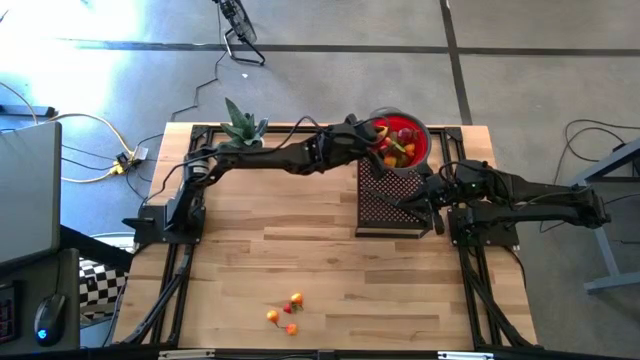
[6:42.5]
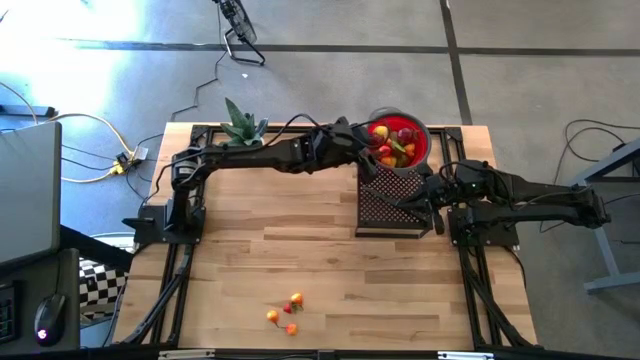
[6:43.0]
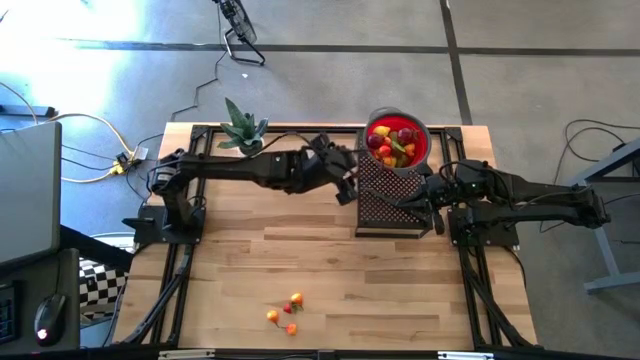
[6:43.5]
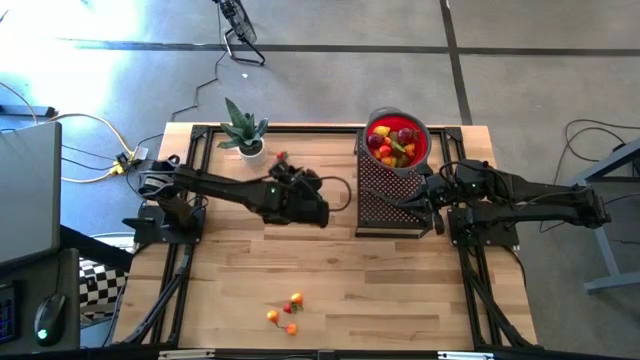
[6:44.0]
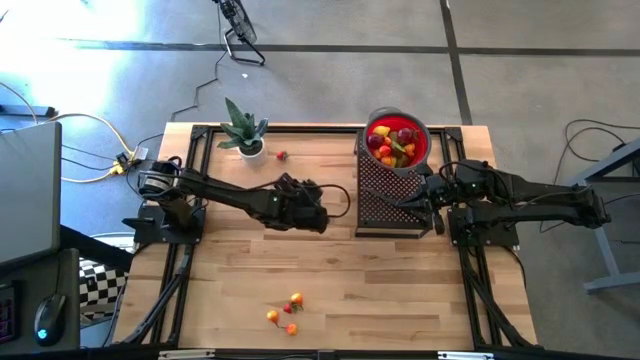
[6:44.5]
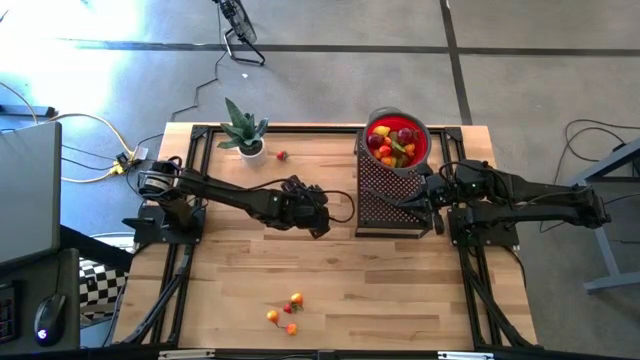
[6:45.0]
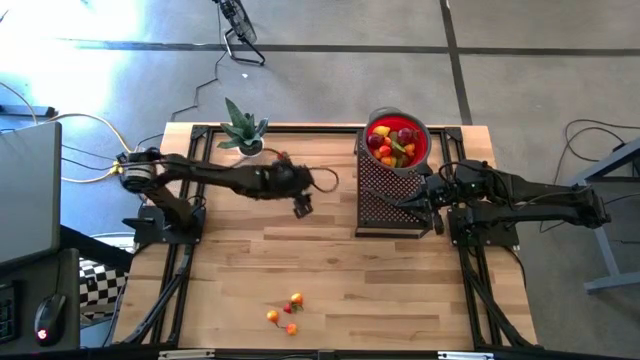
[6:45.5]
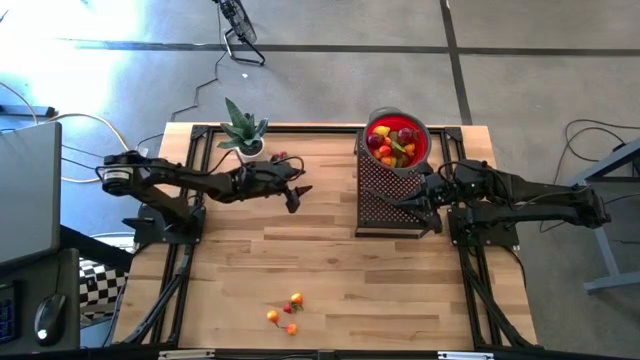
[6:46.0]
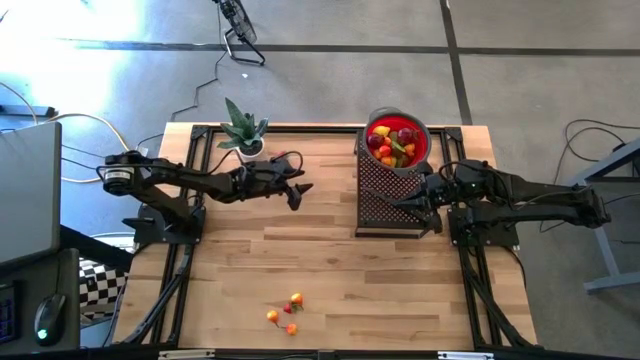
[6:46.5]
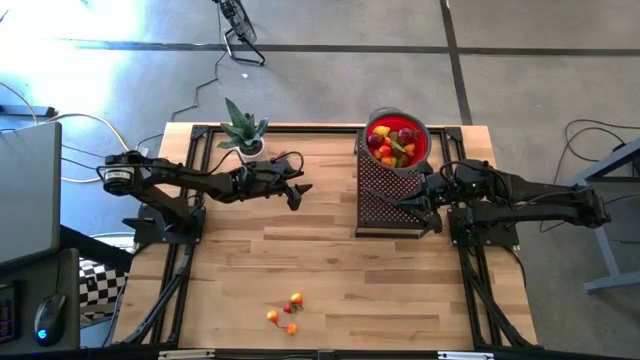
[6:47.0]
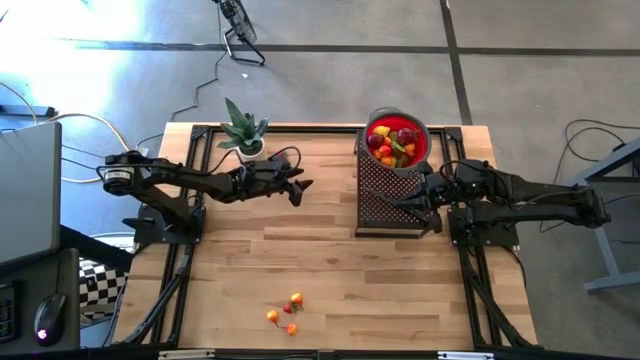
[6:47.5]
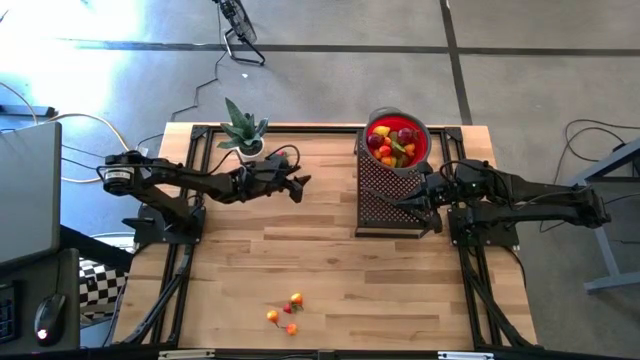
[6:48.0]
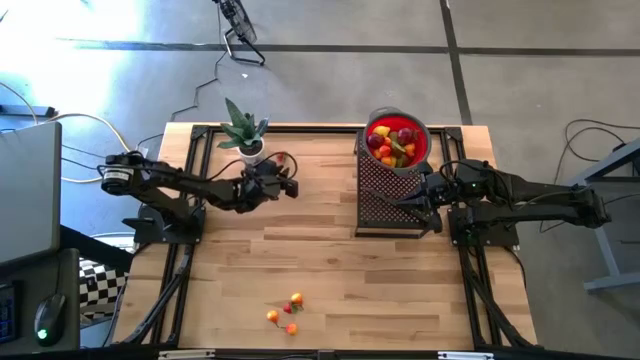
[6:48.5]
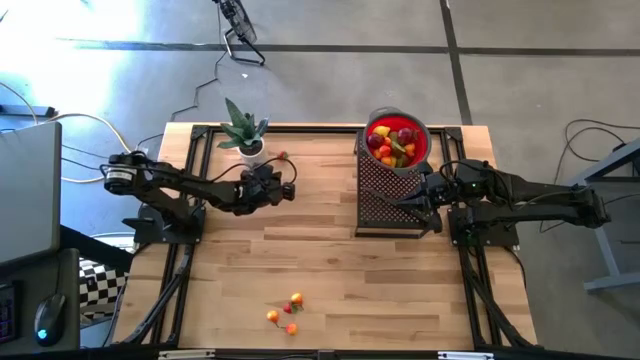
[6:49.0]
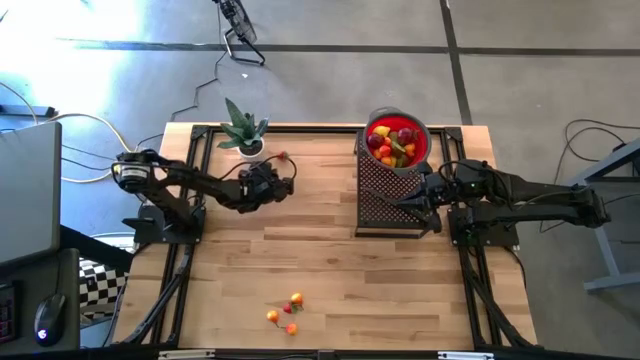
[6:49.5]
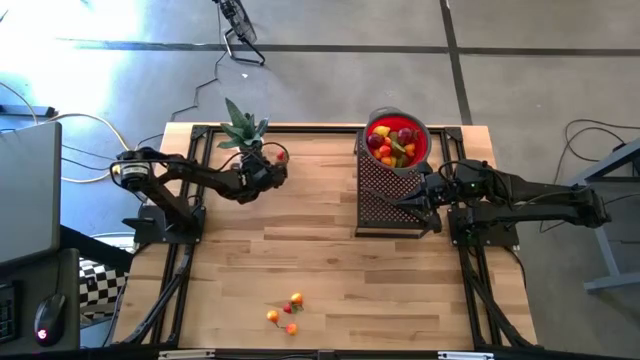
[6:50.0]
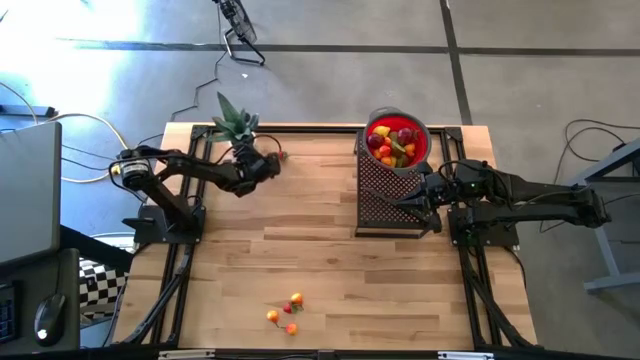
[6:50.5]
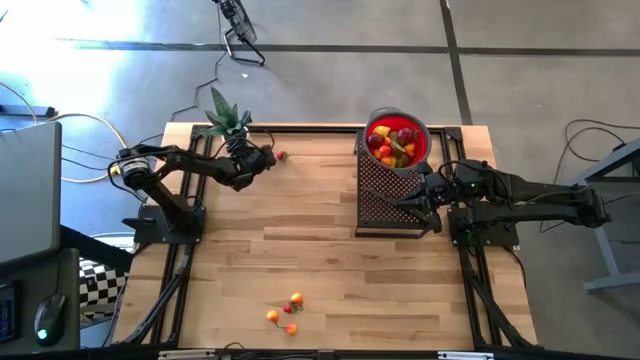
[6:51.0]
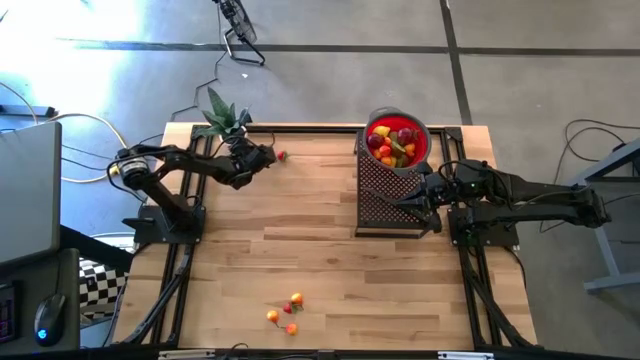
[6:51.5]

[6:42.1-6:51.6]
Task: Pick & Place Fruit
Adjust the plant

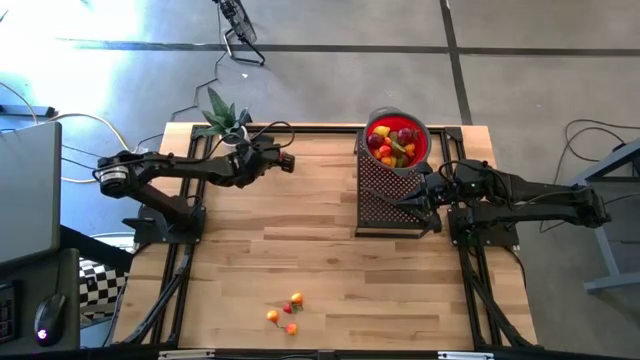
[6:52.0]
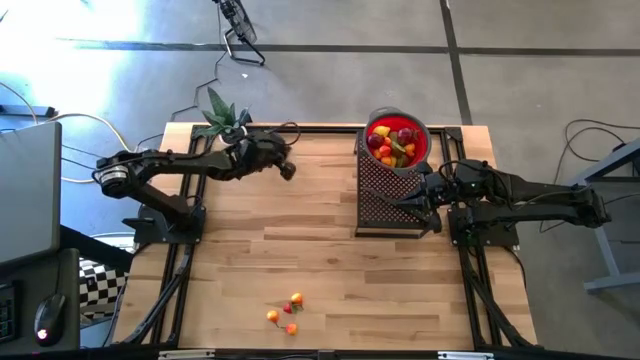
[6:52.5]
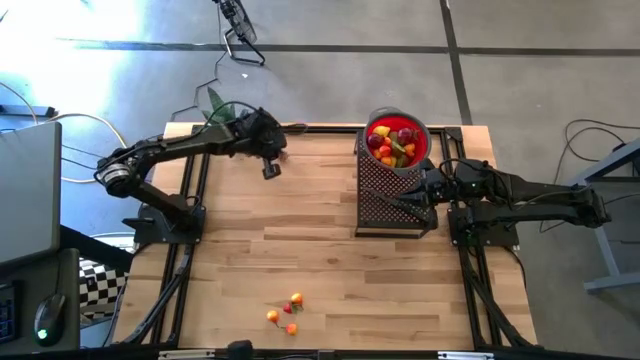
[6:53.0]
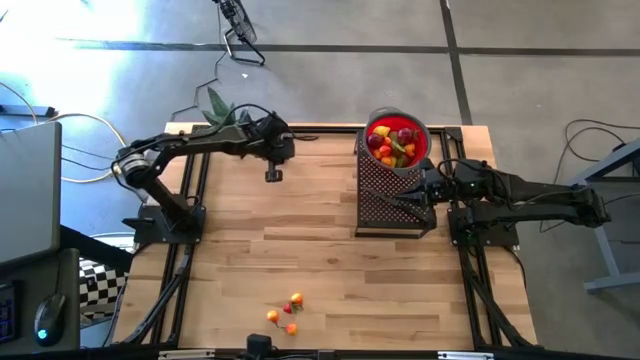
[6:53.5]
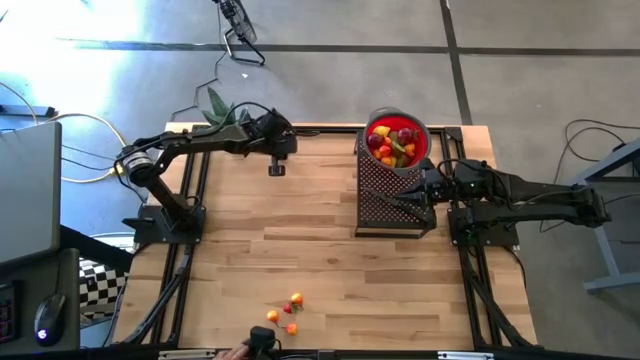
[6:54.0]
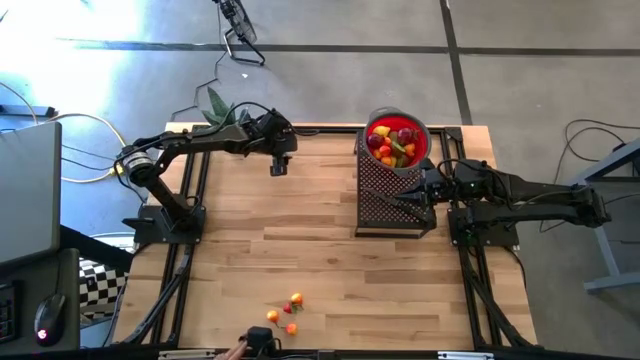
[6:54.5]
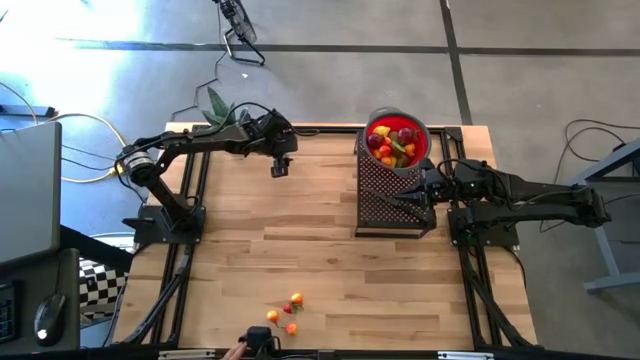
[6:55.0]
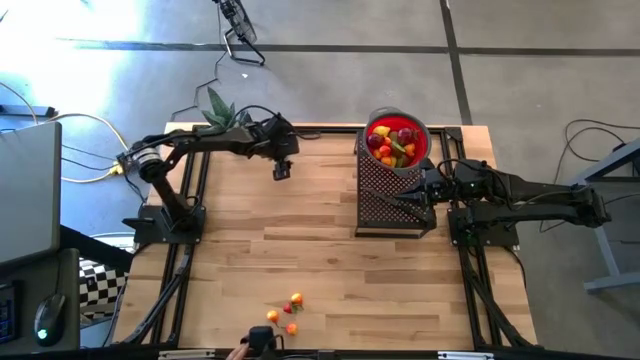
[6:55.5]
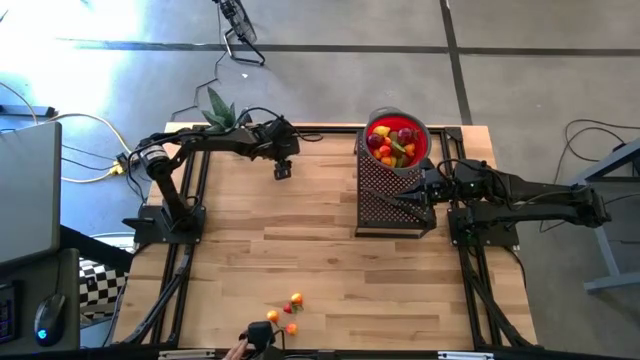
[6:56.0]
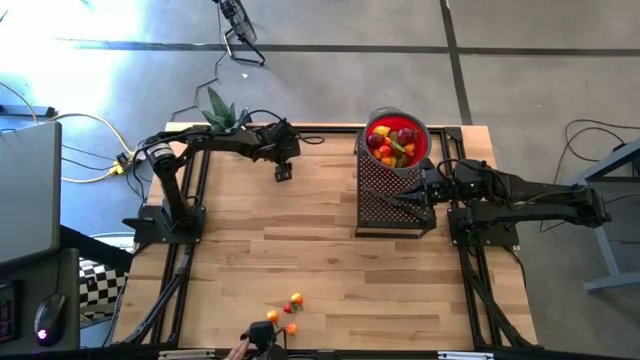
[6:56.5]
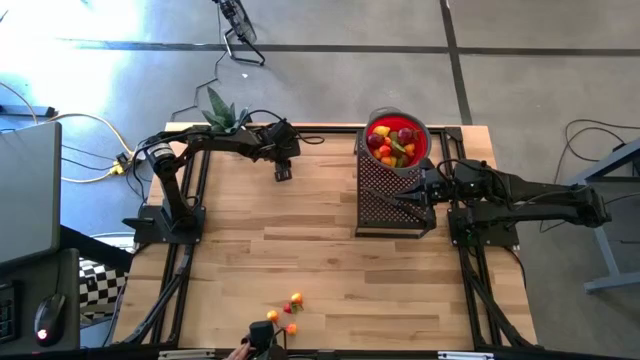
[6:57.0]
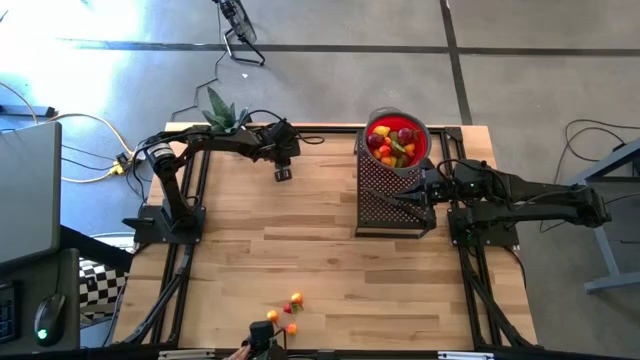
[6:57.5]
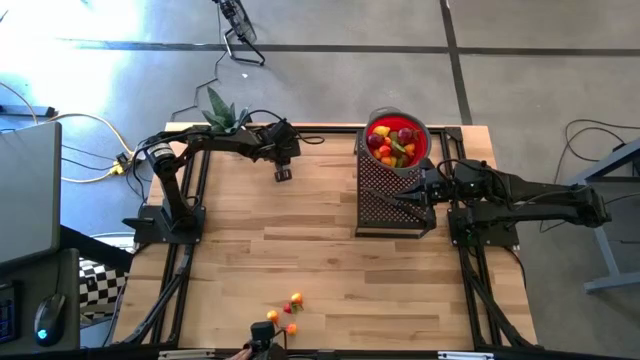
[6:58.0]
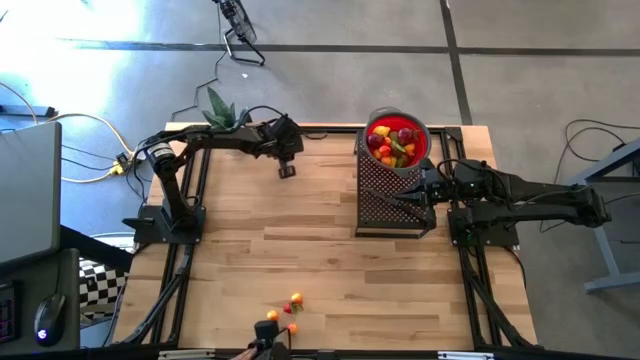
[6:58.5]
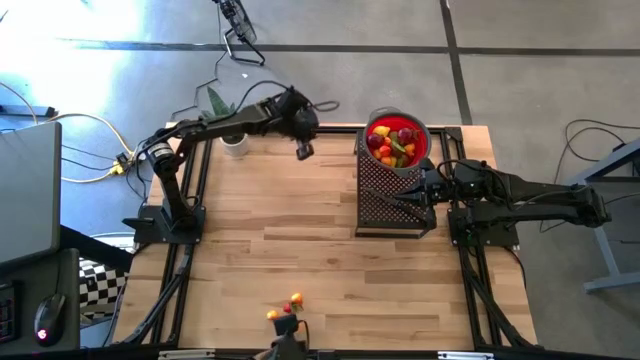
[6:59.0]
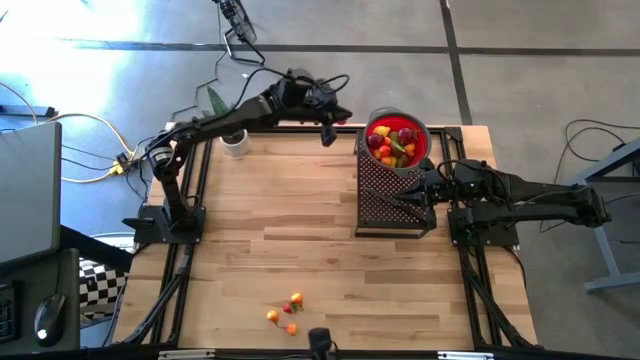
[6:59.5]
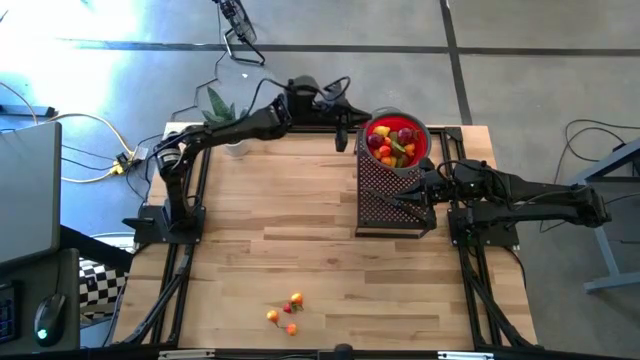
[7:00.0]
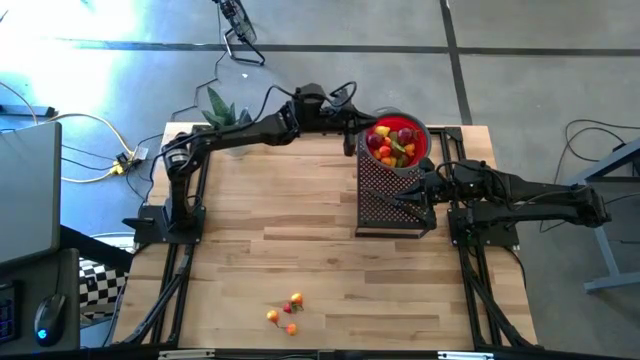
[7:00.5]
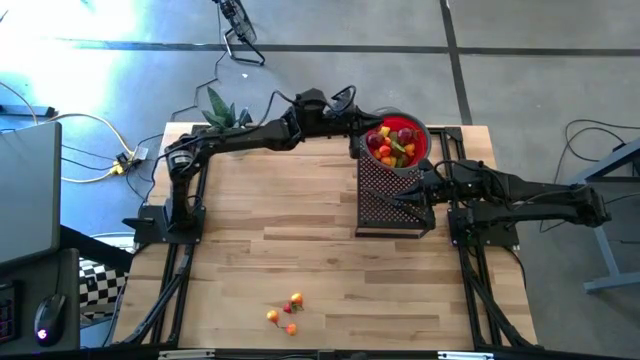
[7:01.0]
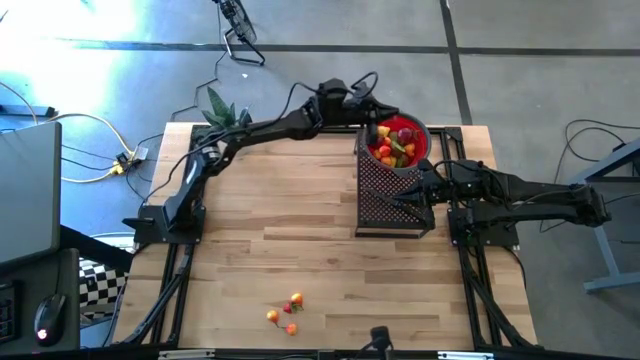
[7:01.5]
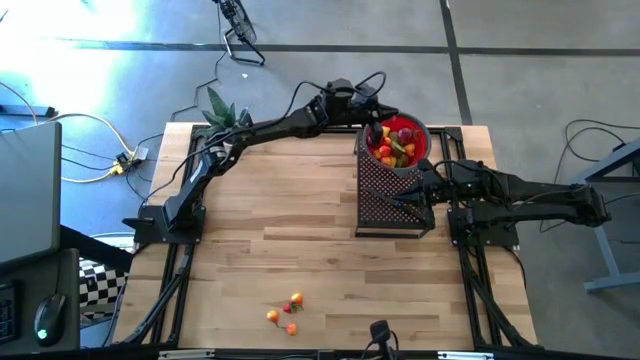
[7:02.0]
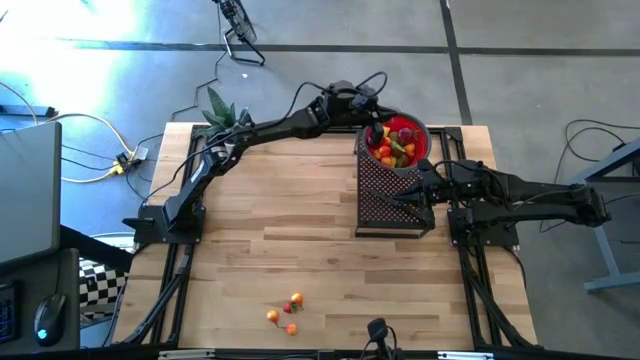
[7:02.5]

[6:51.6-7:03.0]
Put the strawberry into the strainer bowl on the shelf

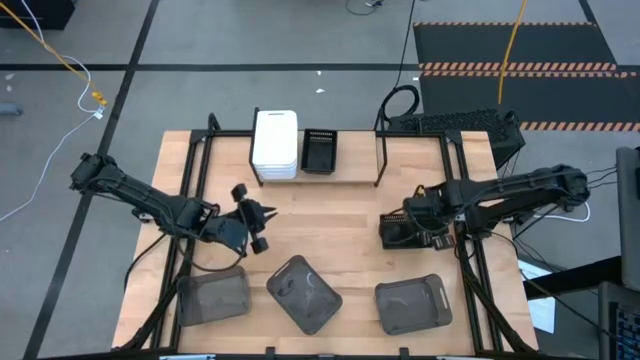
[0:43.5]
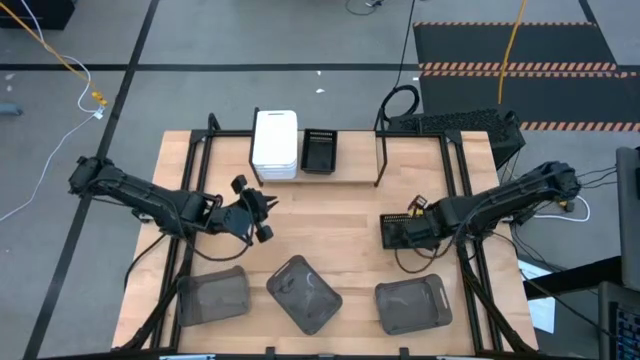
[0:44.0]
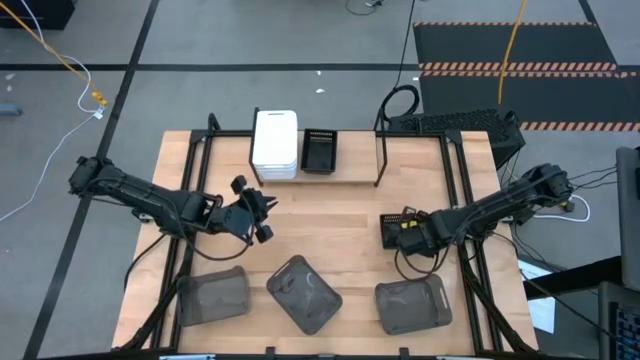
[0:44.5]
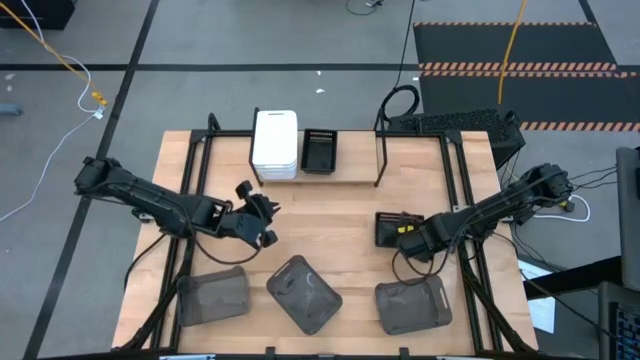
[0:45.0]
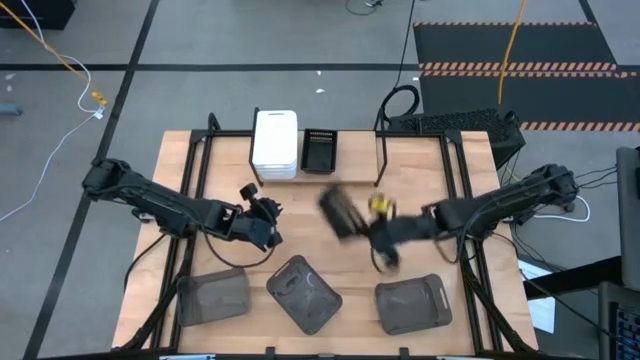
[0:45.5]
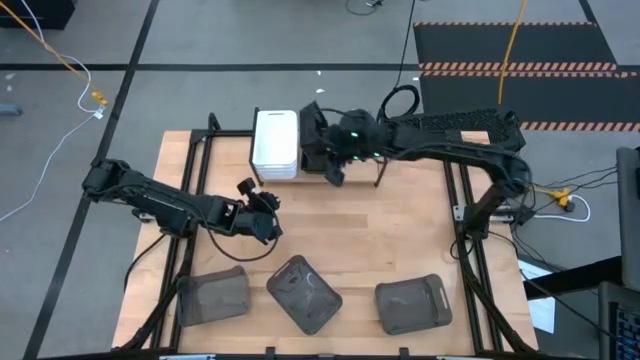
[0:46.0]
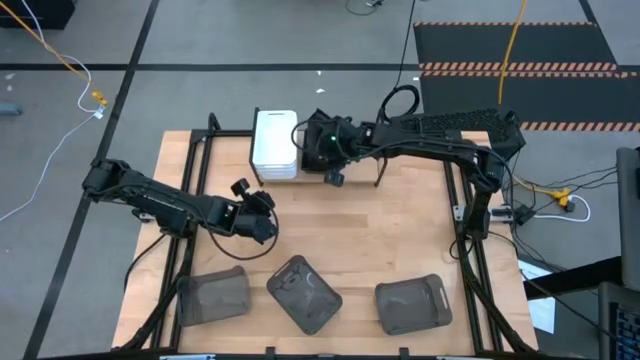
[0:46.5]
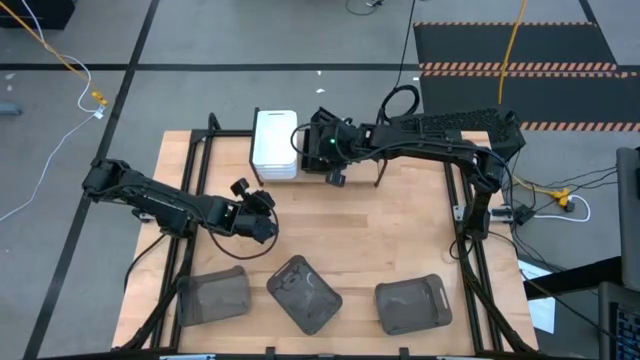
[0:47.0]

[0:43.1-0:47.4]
Task: Stack baskets on shelf by color
Stack the black bin on top of the other black bin on the shelf
